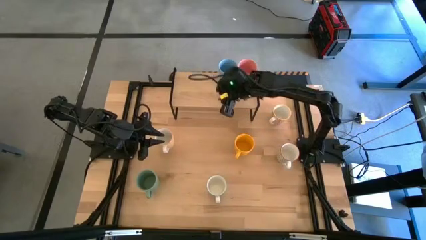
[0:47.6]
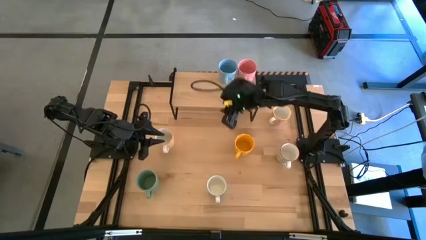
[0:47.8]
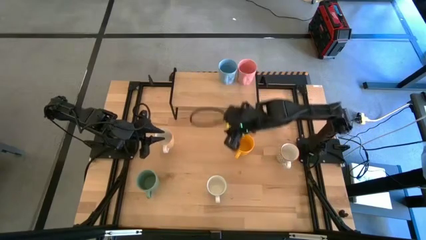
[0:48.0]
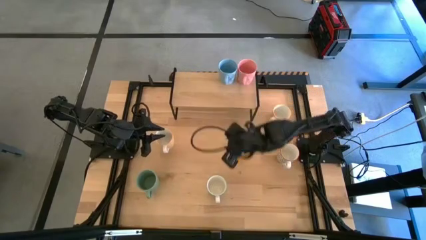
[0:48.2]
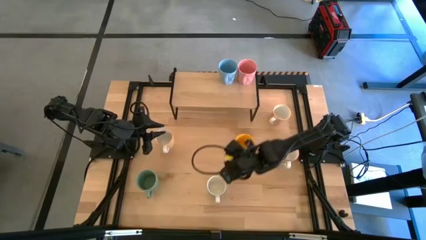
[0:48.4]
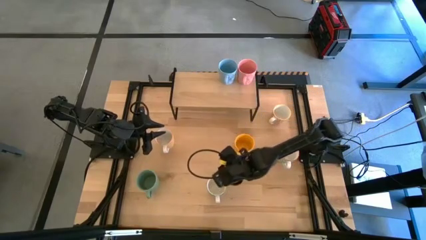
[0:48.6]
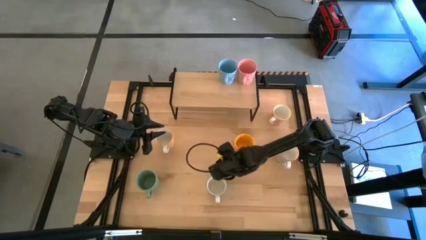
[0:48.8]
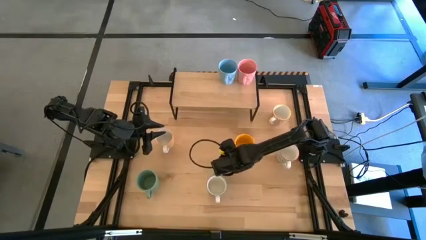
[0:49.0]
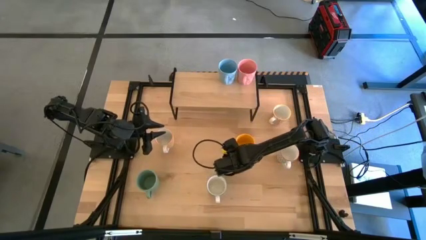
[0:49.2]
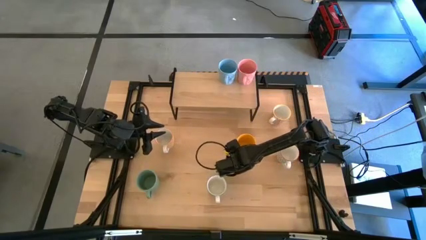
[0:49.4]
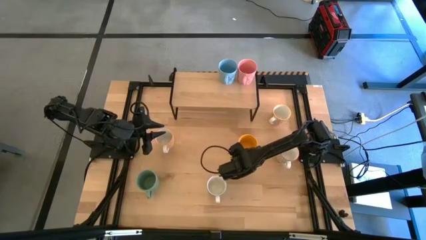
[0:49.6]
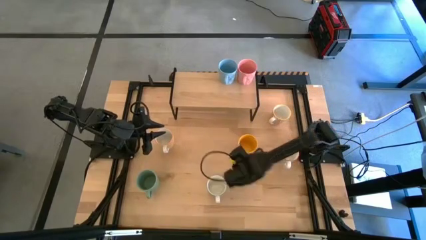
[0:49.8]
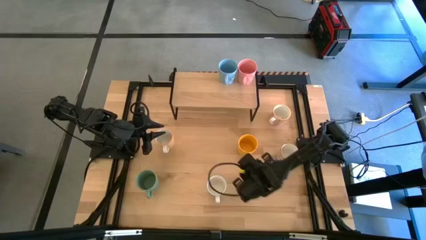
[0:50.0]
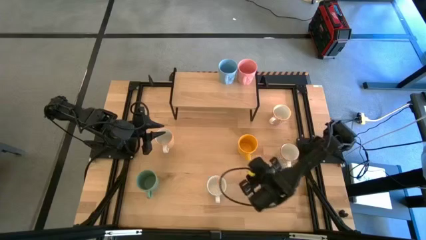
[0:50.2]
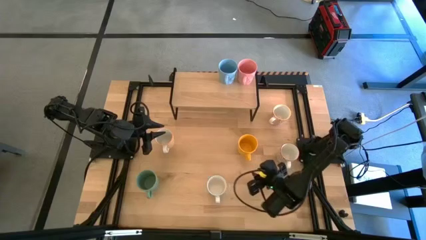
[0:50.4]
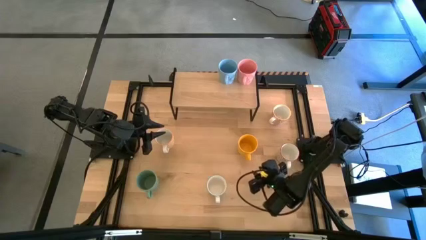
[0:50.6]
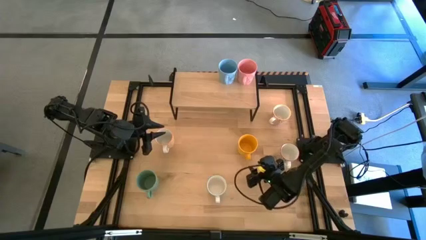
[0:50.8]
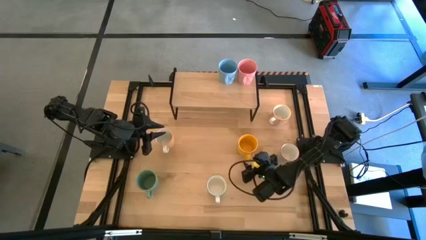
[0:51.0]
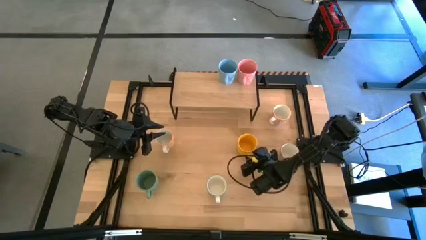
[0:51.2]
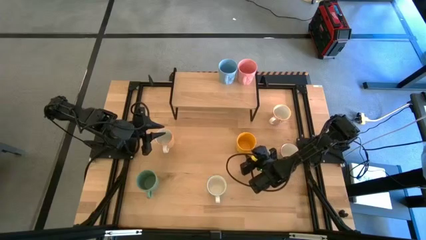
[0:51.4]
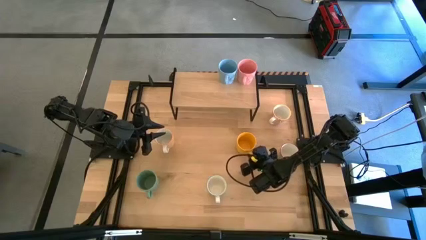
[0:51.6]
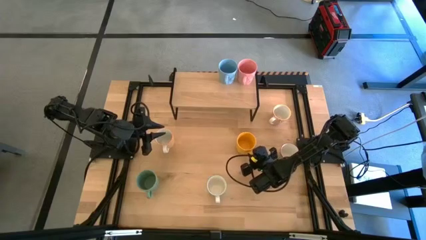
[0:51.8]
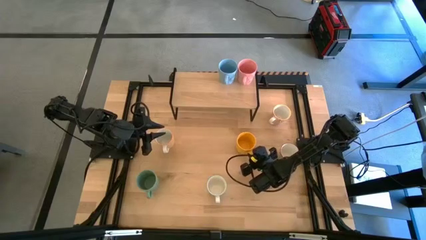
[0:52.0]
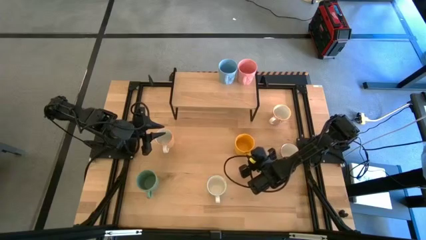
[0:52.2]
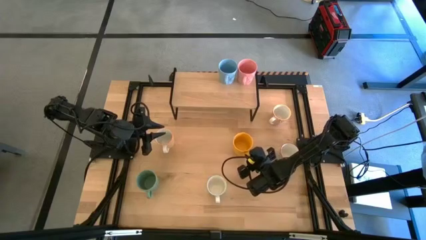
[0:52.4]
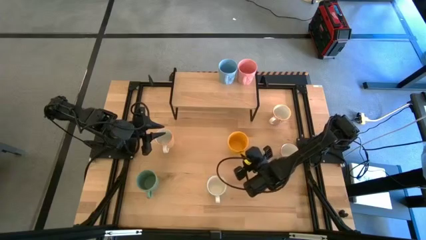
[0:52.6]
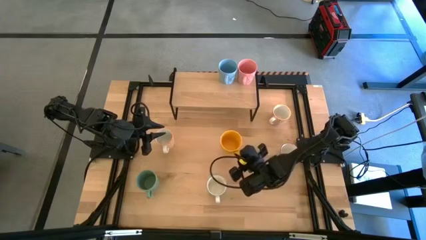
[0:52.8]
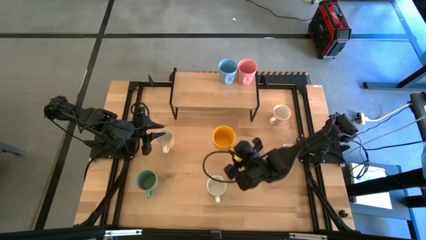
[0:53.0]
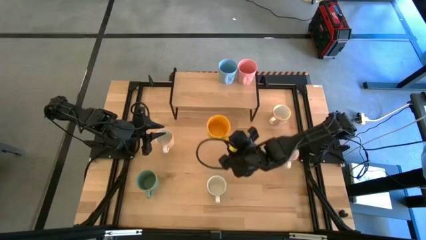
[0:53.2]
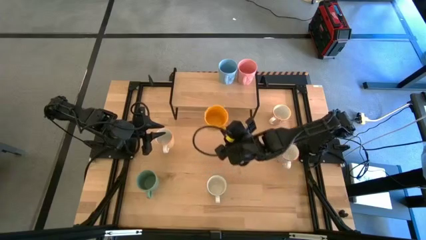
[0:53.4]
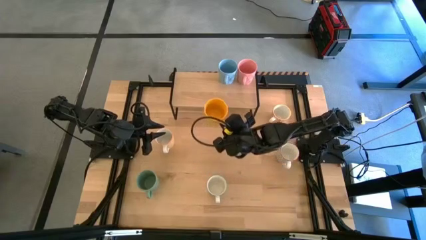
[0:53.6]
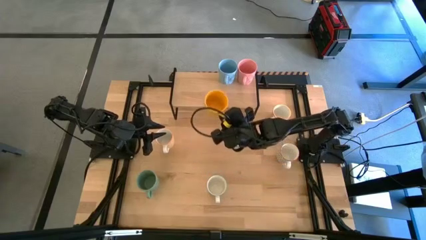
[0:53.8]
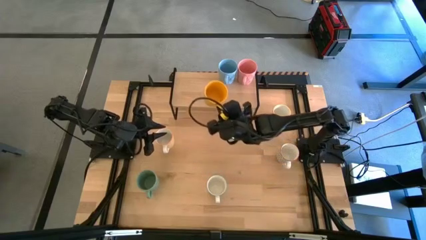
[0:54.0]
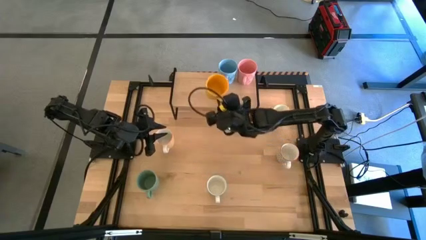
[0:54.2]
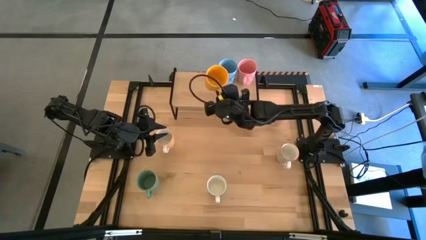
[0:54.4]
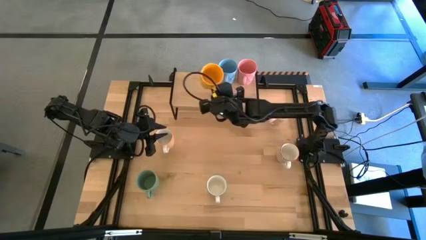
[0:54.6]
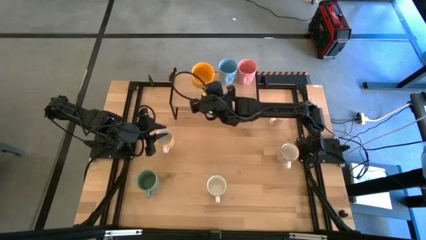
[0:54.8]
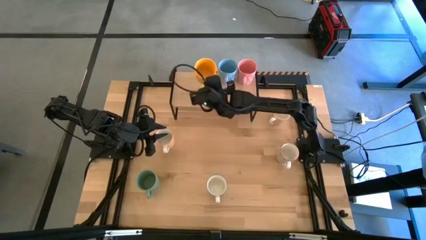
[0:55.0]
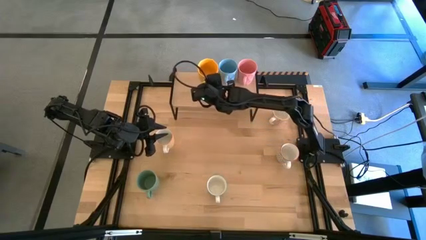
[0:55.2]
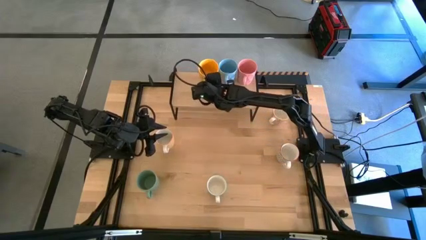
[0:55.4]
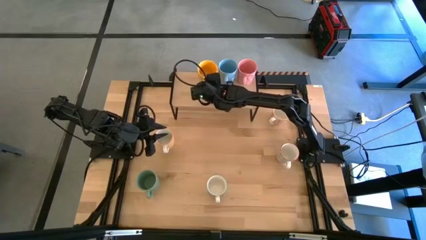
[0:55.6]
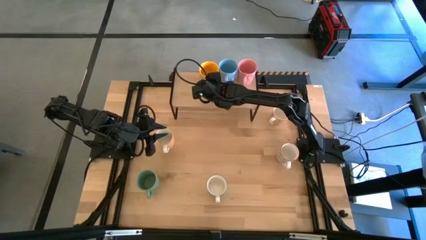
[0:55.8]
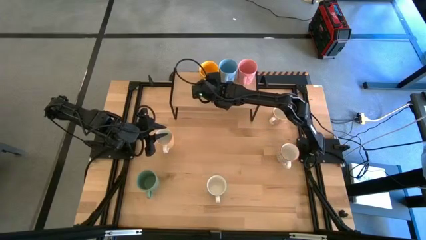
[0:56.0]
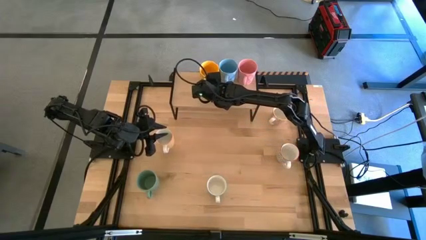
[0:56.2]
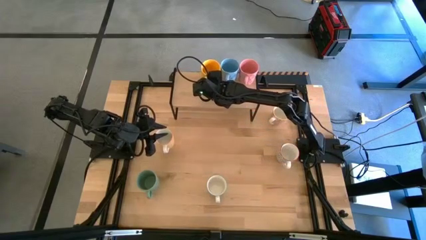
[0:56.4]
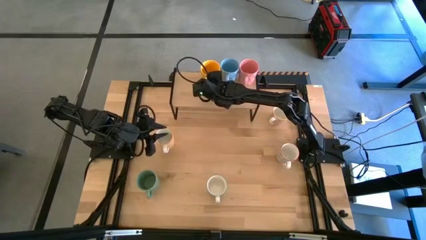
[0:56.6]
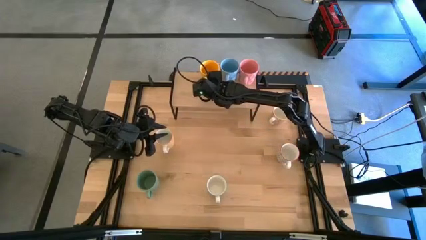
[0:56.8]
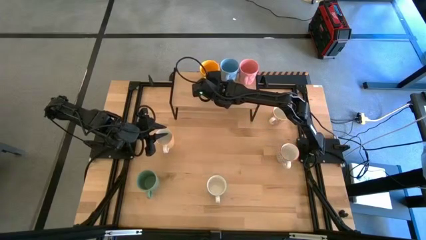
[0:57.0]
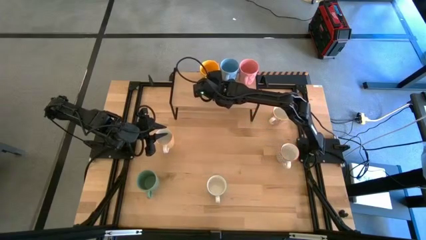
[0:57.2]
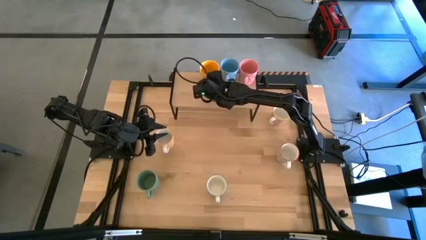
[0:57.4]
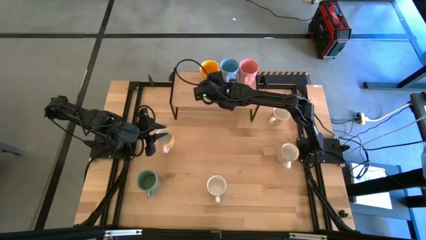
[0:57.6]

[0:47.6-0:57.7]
Task: Place coffee mugs
Put the yellow mug on the shelf
